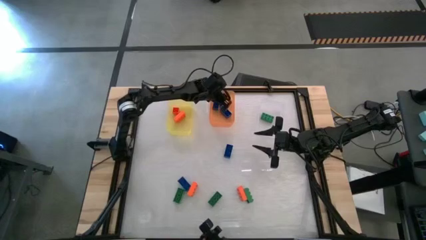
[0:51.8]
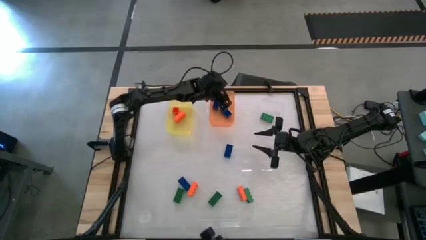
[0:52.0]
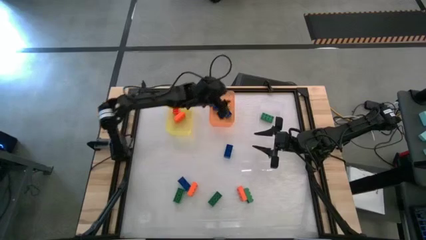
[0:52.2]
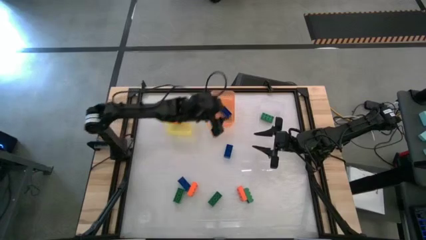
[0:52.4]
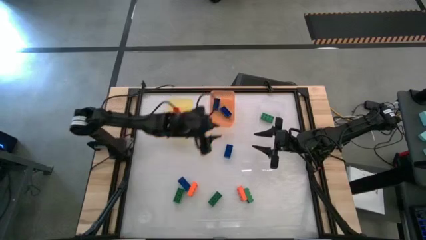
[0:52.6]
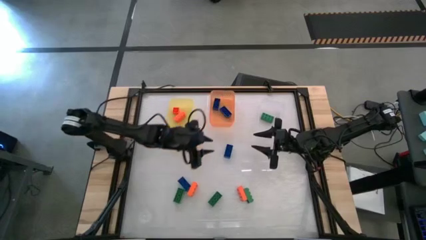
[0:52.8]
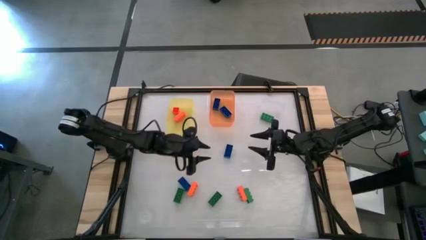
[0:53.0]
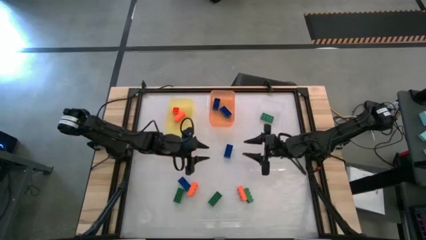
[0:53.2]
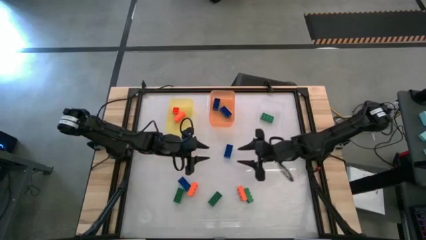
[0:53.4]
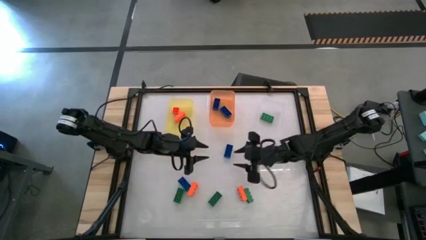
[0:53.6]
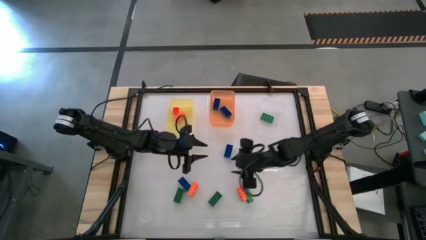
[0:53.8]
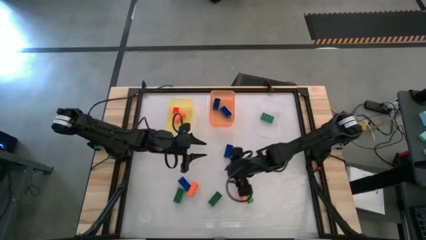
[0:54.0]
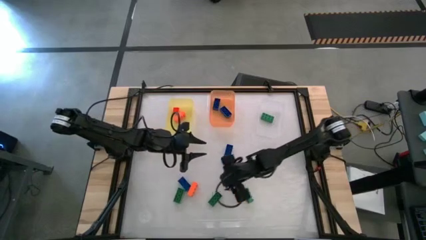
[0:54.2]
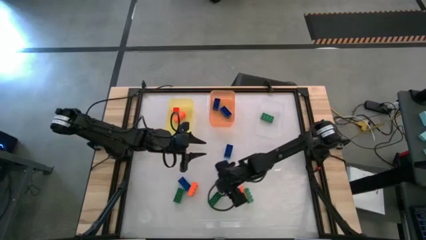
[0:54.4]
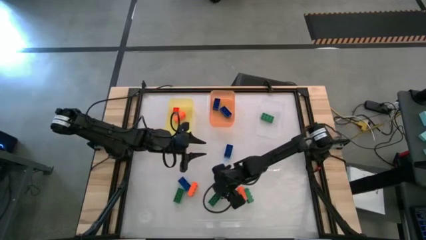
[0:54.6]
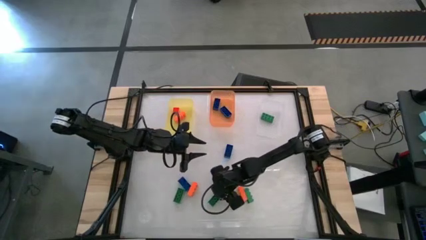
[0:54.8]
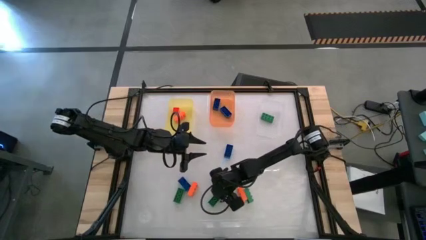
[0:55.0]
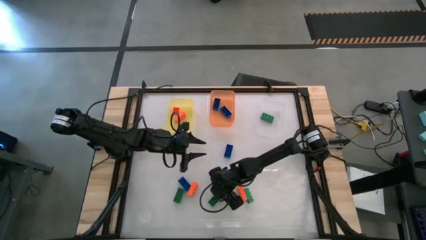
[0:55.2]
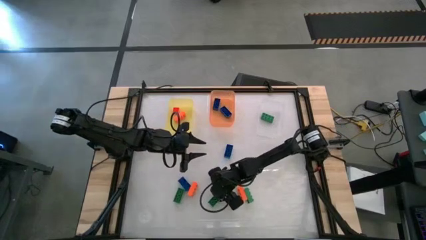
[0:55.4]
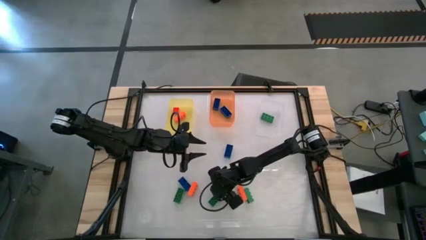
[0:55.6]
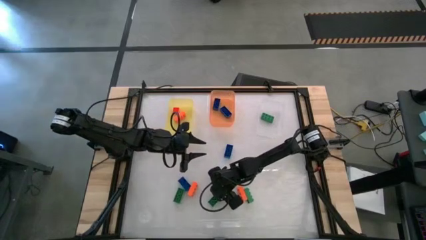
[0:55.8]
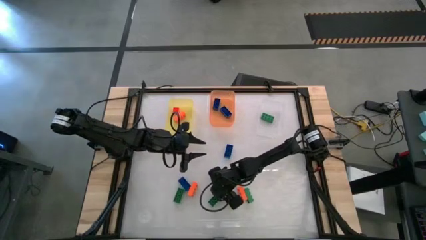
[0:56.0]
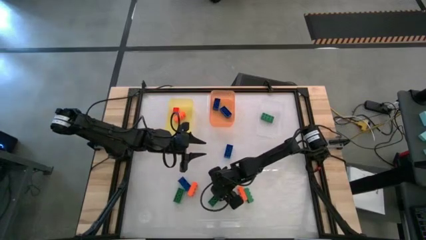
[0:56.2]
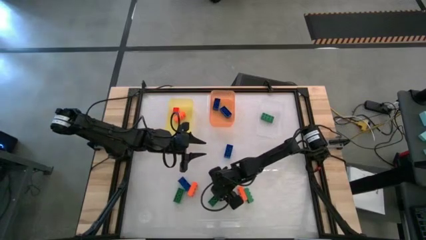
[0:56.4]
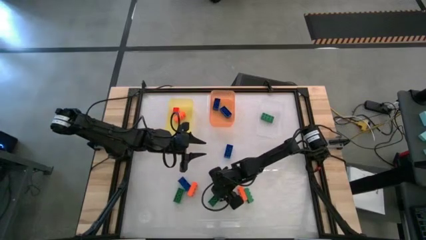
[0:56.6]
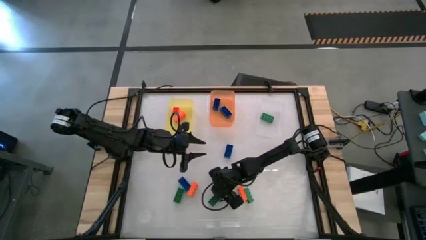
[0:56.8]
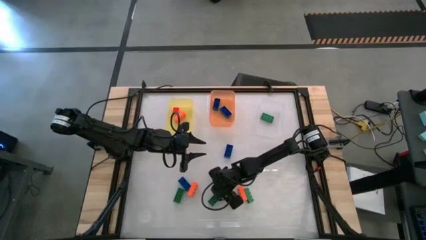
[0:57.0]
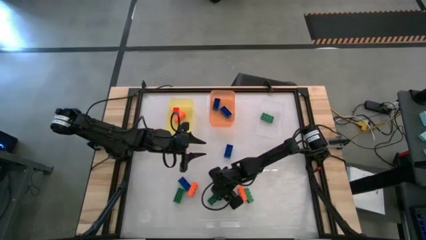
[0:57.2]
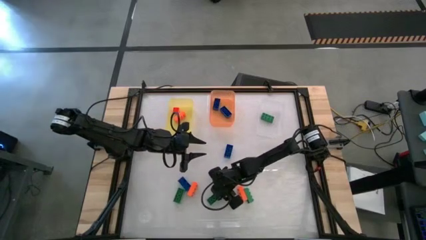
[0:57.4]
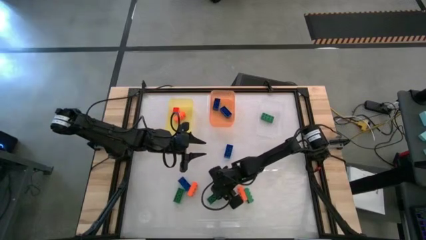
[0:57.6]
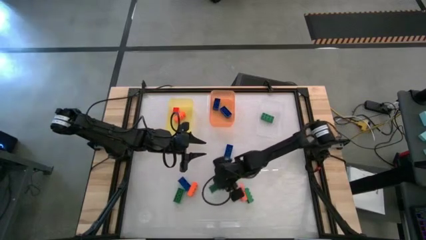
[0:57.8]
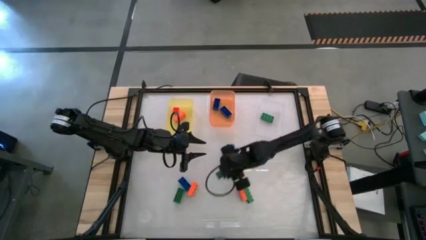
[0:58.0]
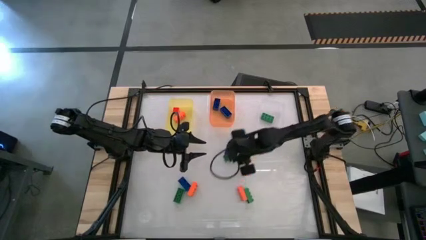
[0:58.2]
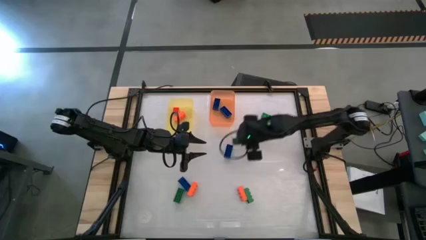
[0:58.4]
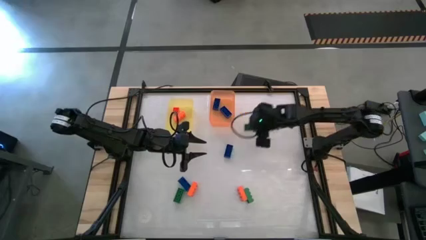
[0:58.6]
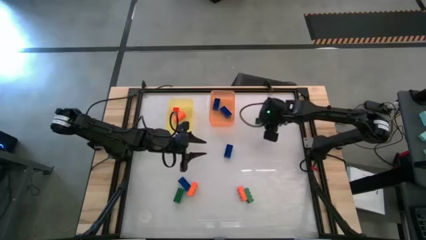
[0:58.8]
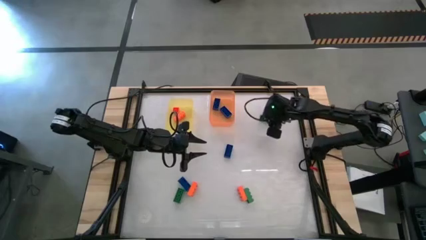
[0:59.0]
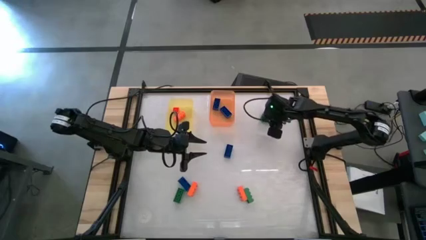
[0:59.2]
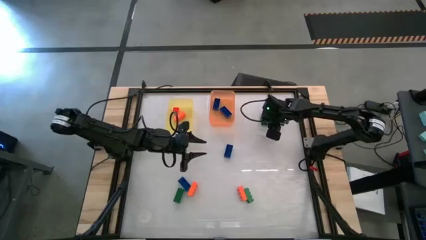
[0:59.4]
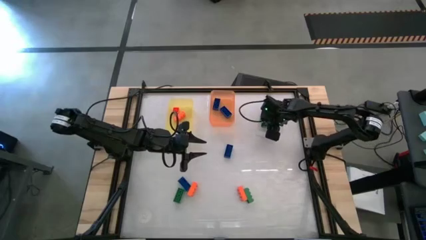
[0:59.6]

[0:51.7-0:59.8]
Task: Sort & place blocks by color
Put the green game piece into the transparent bin

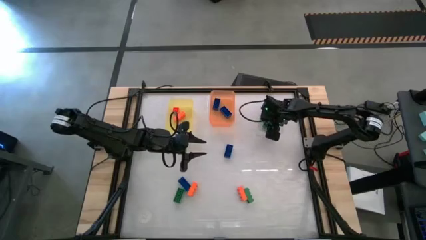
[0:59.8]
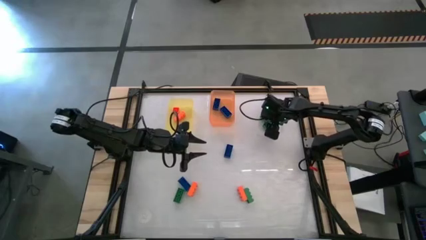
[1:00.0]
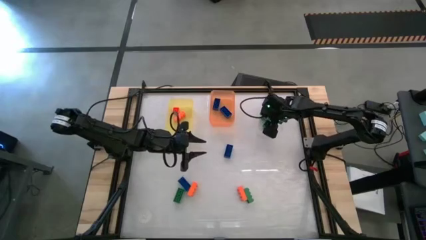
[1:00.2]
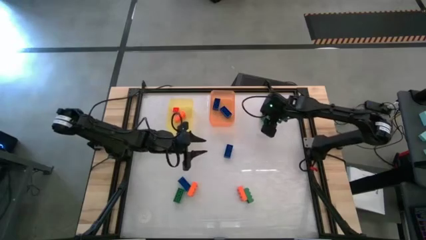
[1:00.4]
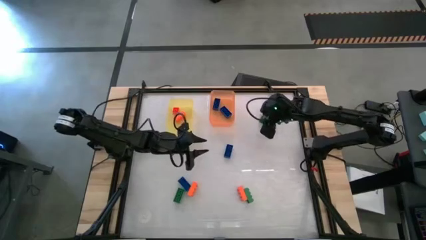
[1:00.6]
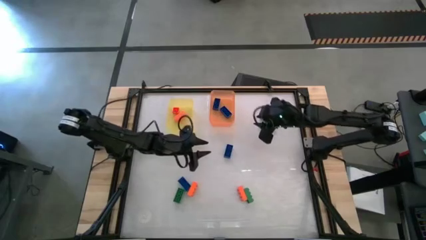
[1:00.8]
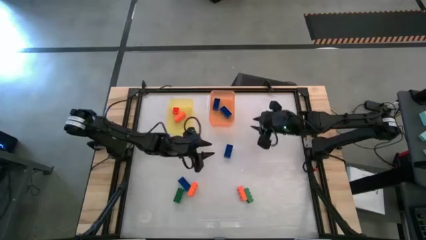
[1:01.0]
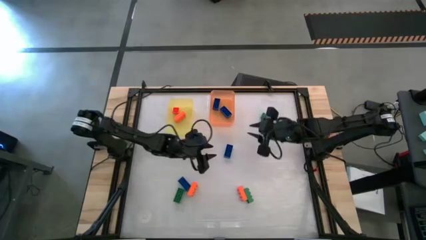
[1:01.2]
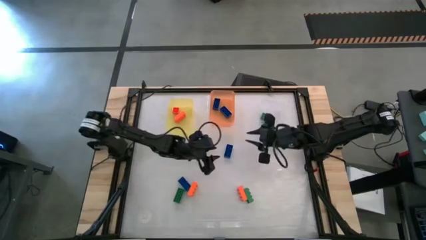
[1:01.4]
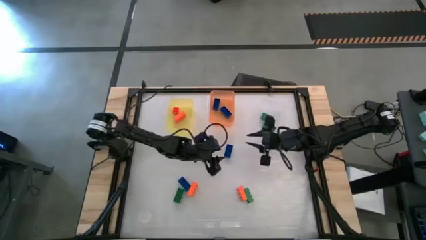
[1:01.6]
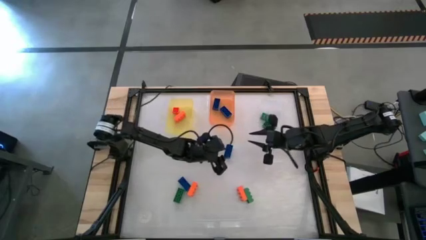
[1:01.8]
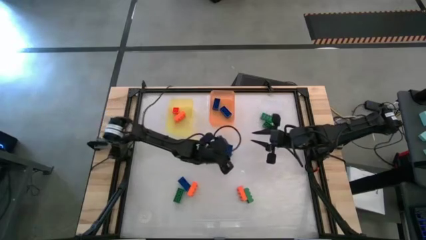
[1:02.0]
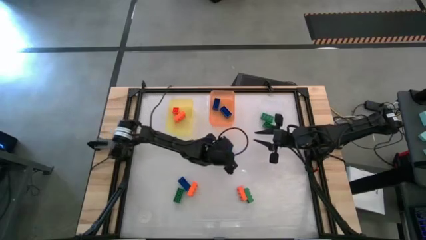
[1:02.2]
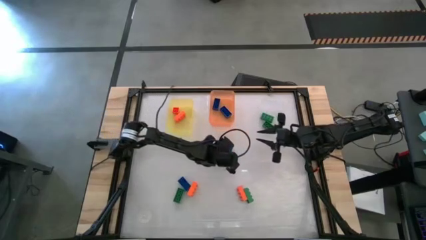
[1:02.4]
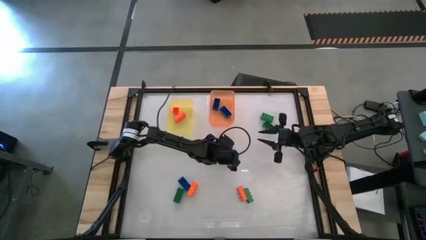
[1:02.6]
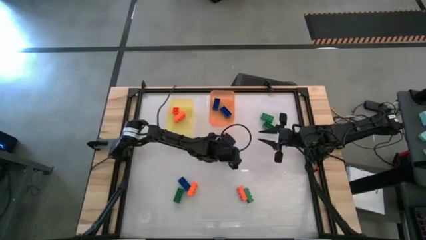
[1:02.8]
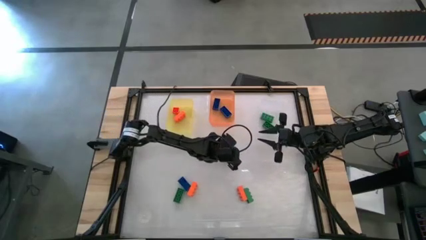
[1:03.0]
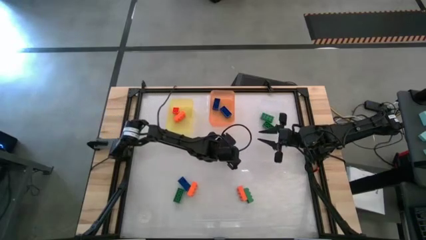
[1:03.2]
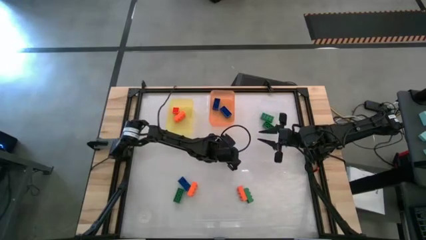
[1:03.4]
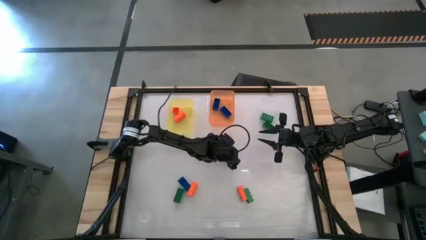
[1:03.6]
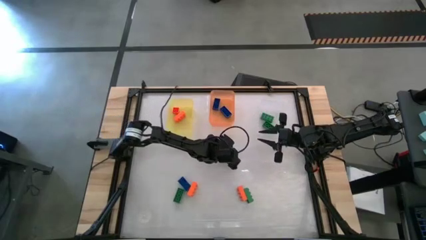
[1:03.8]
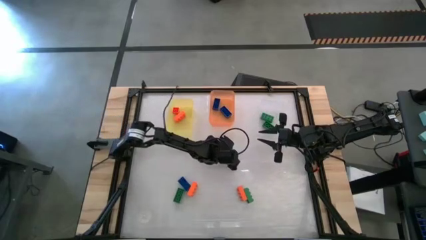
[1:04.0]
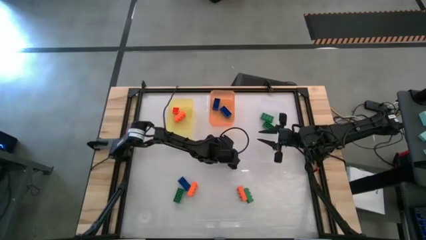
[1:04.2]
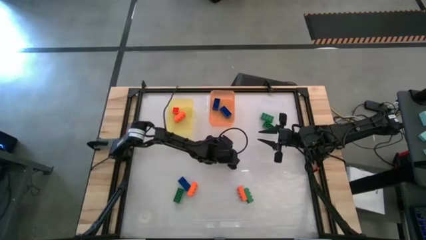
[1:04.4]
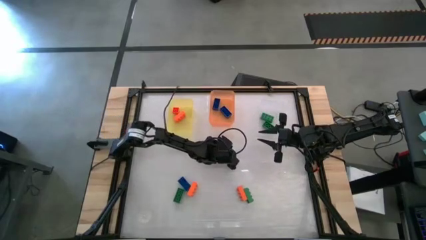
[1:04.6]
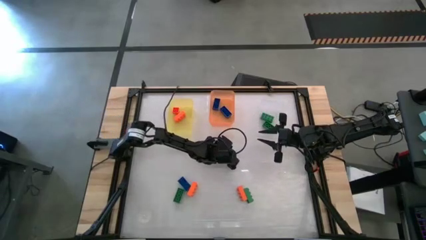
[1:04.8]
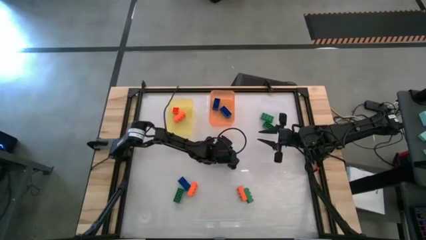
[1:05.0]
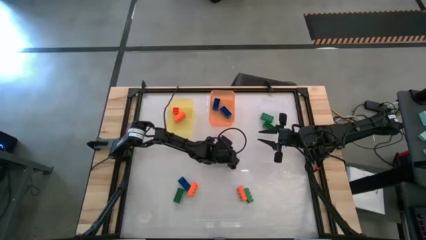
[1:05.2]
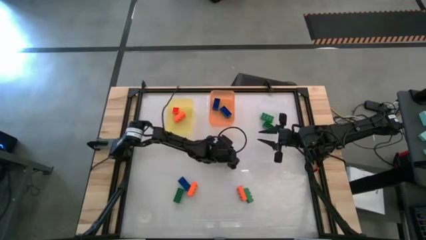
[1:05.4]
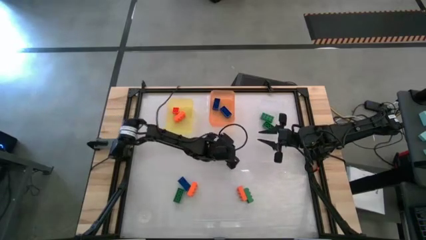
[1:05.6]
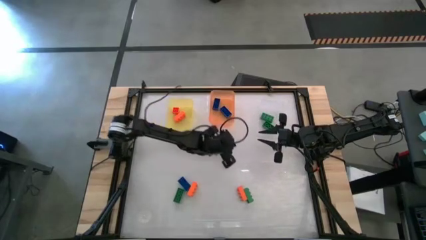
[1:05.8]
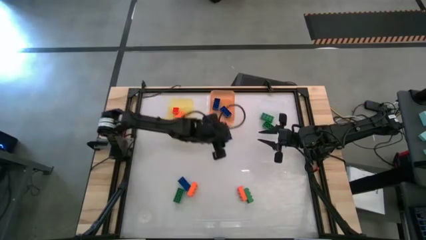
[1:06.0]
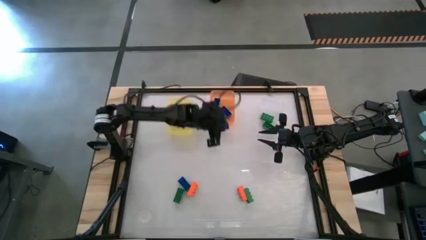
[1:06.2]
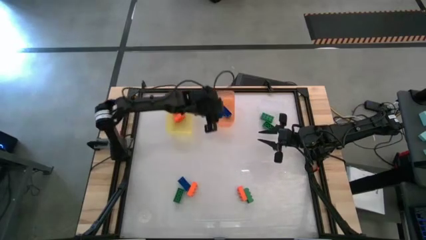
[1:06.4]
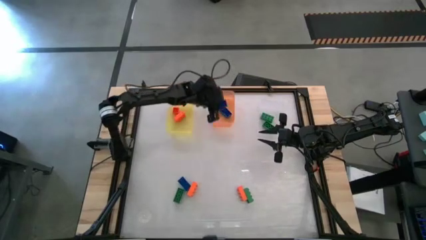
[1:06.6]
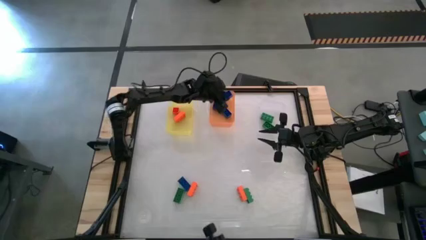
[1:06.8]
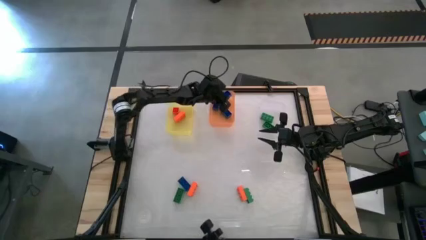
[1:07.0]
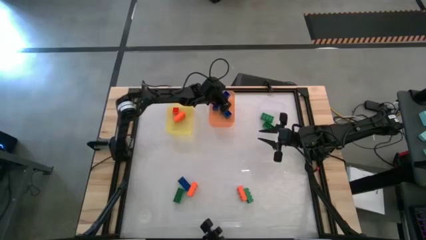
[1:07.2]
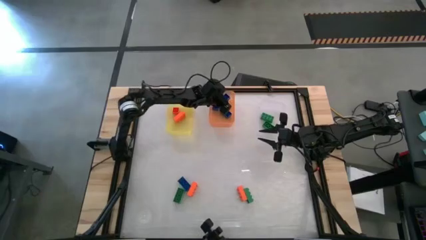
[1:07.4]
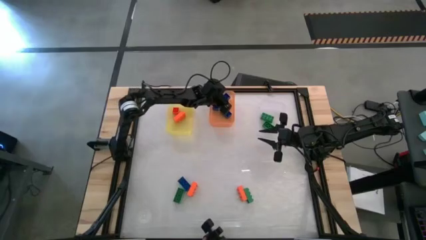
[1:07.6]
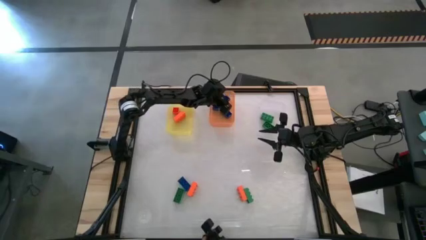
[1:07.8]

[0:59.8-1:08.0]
Put the blue game piece into the orange bin
